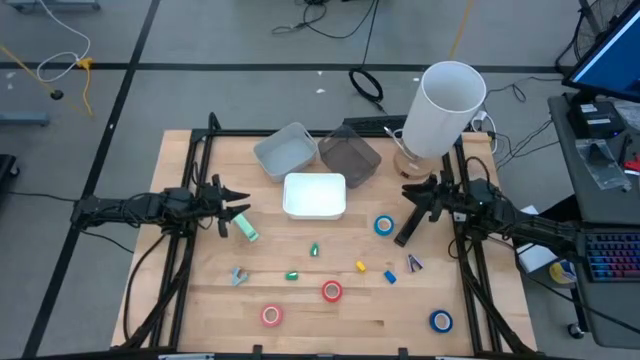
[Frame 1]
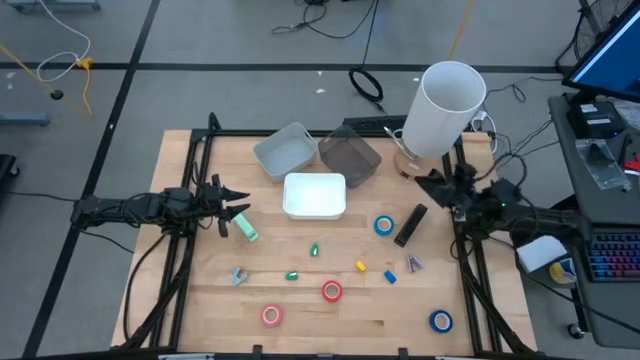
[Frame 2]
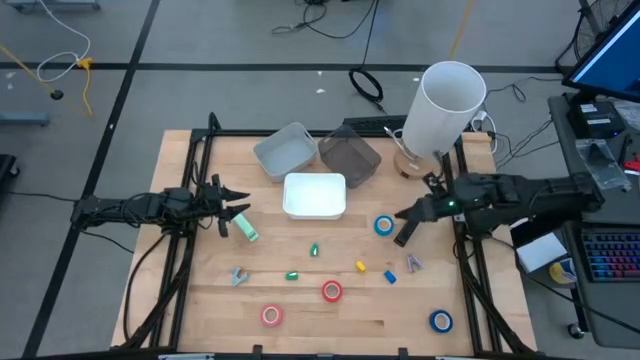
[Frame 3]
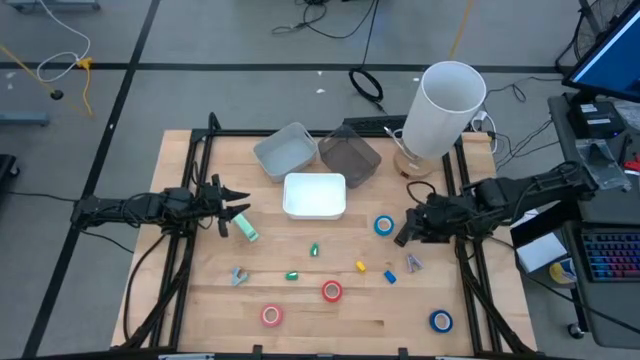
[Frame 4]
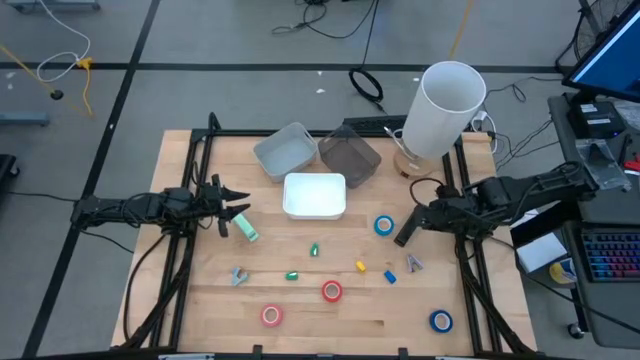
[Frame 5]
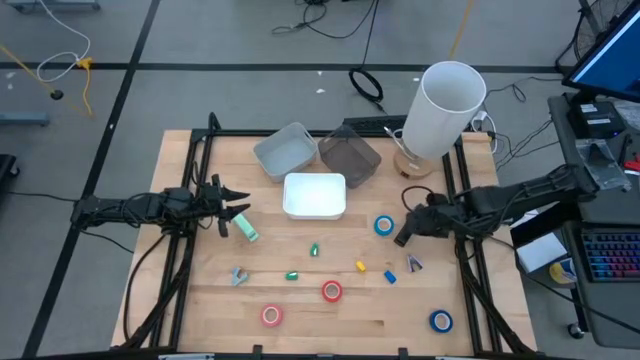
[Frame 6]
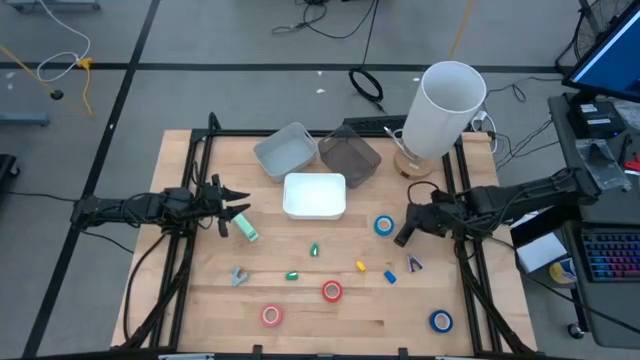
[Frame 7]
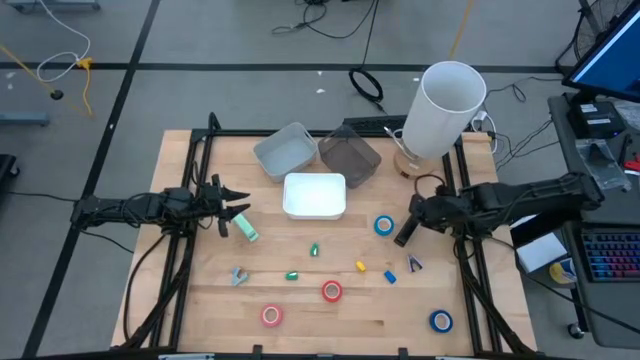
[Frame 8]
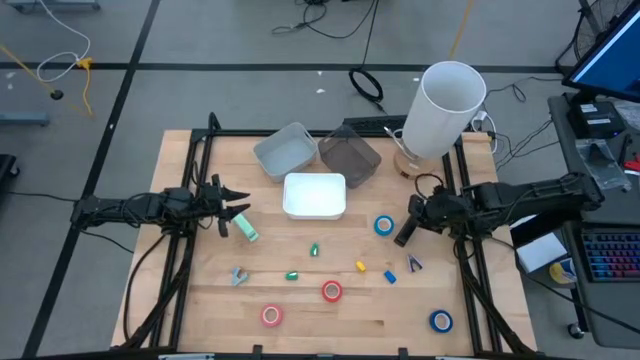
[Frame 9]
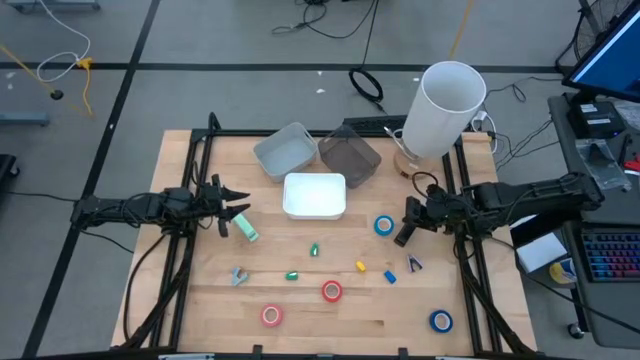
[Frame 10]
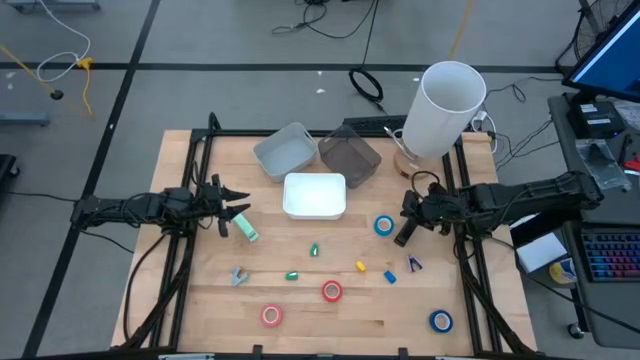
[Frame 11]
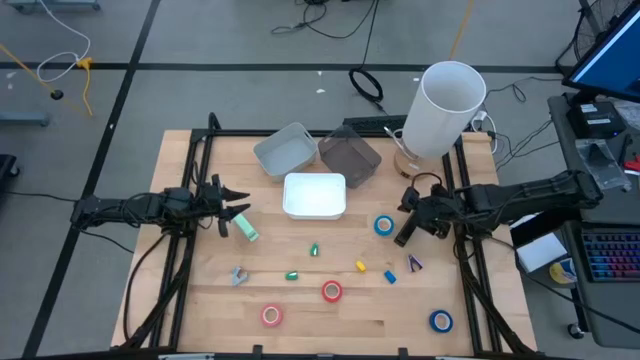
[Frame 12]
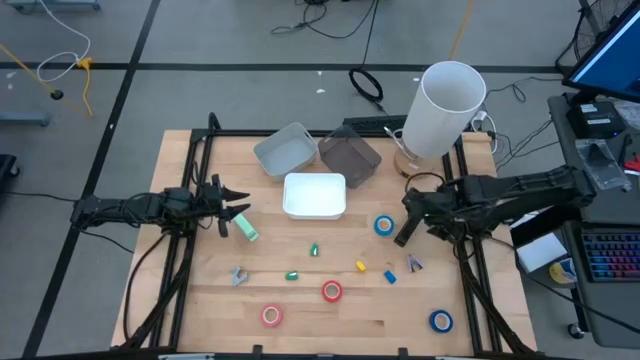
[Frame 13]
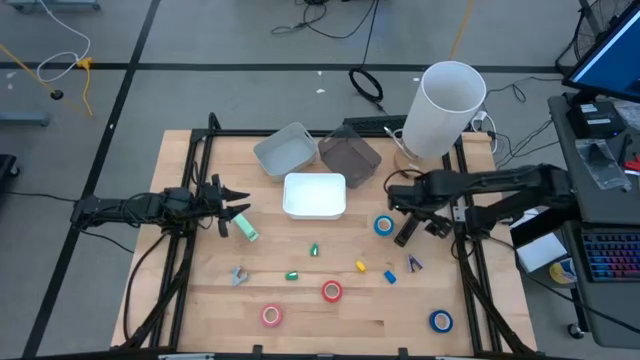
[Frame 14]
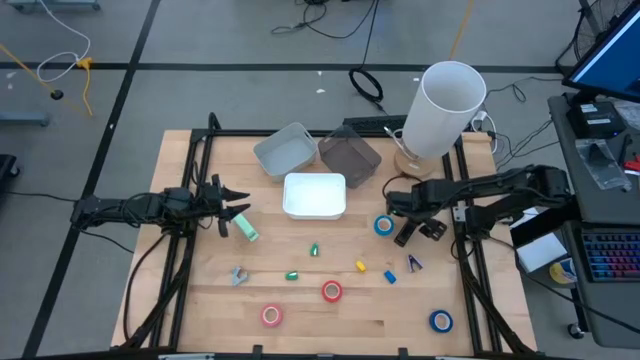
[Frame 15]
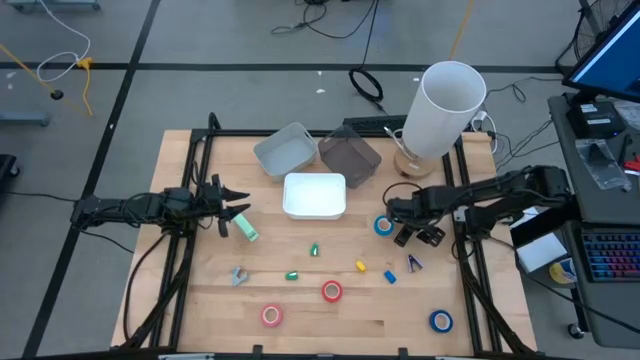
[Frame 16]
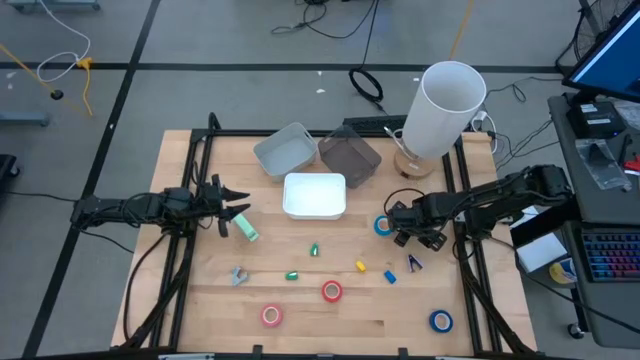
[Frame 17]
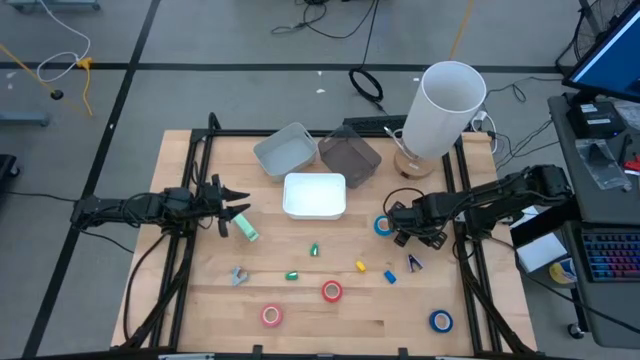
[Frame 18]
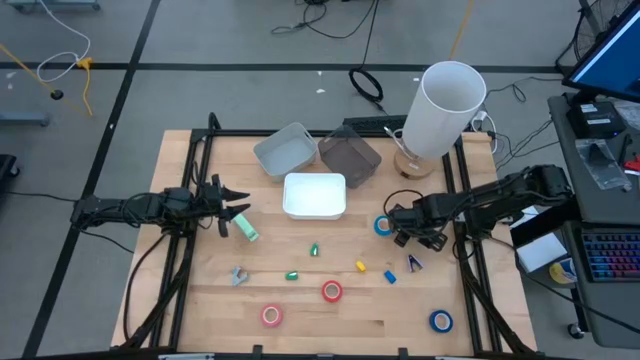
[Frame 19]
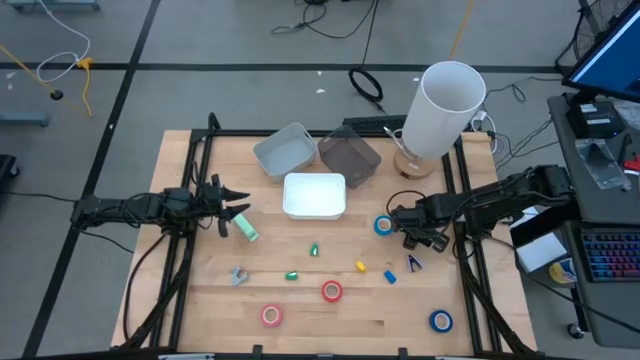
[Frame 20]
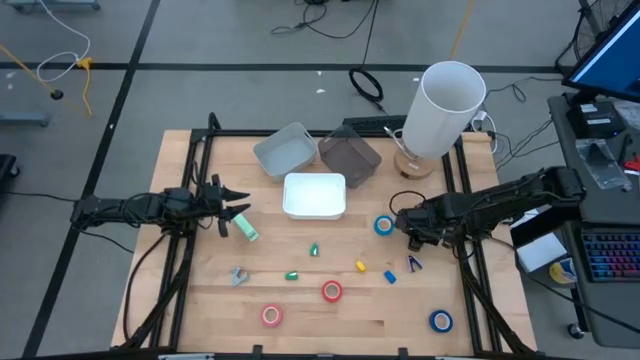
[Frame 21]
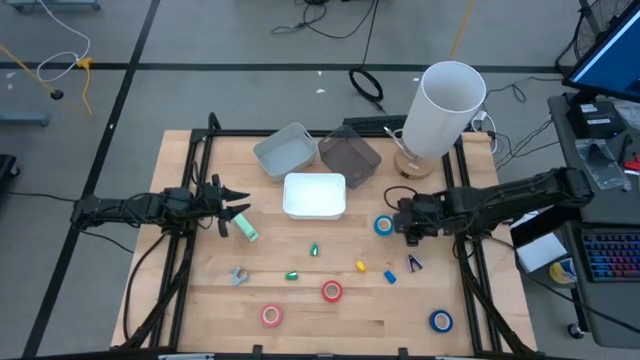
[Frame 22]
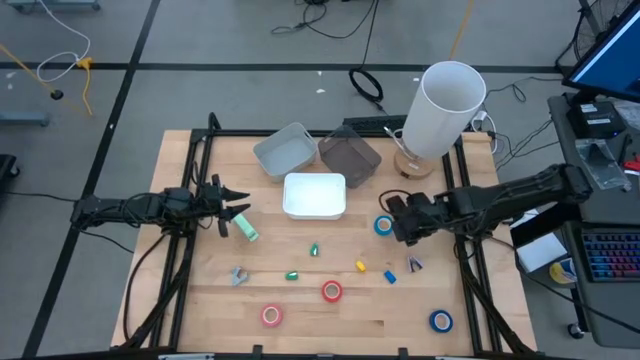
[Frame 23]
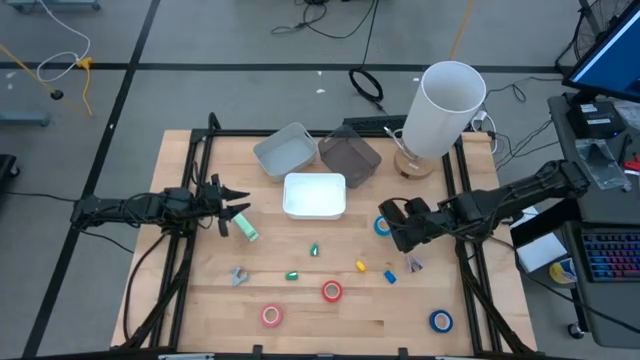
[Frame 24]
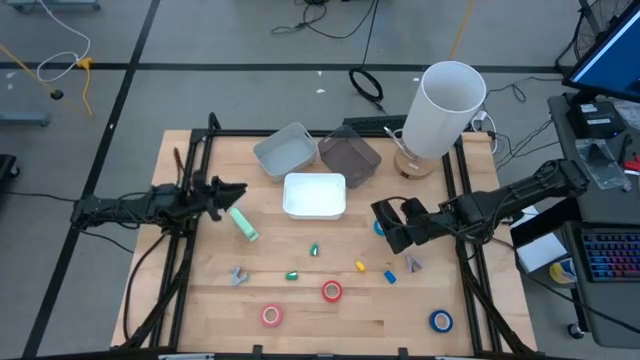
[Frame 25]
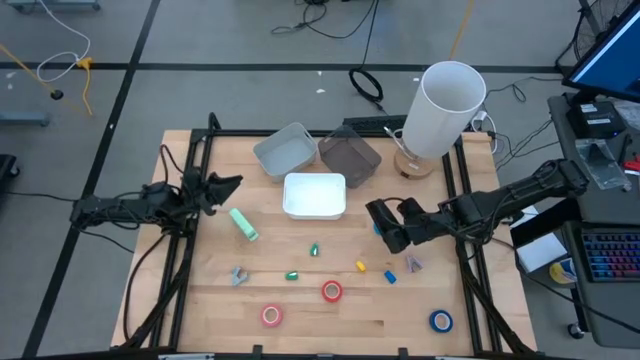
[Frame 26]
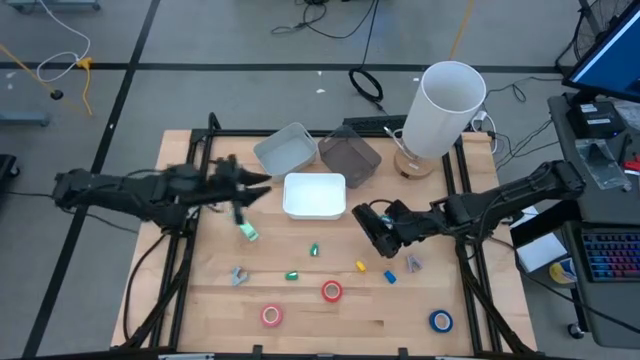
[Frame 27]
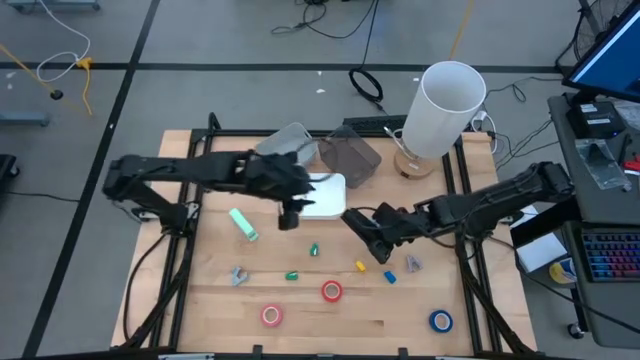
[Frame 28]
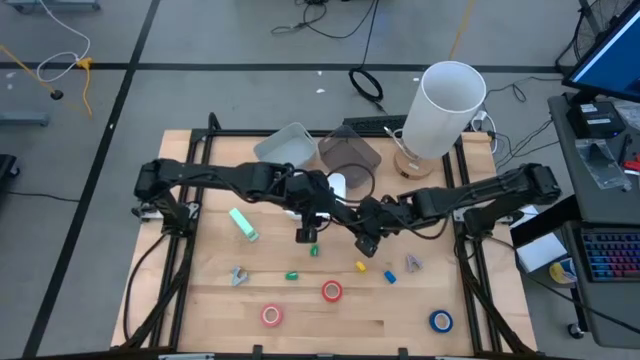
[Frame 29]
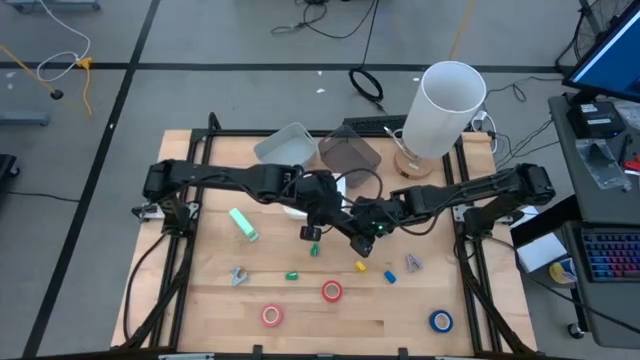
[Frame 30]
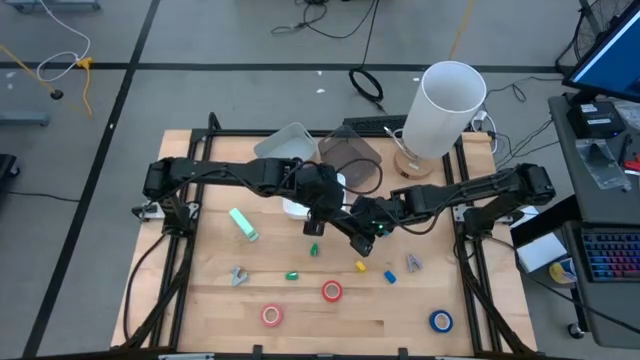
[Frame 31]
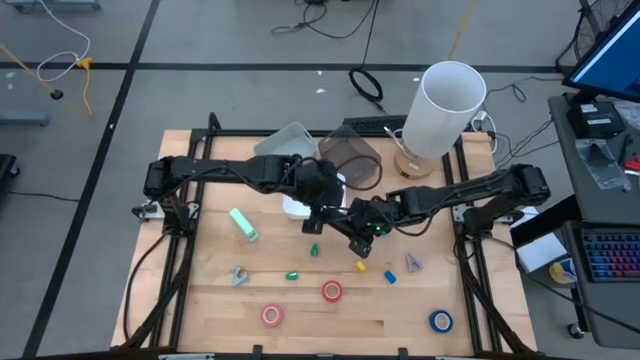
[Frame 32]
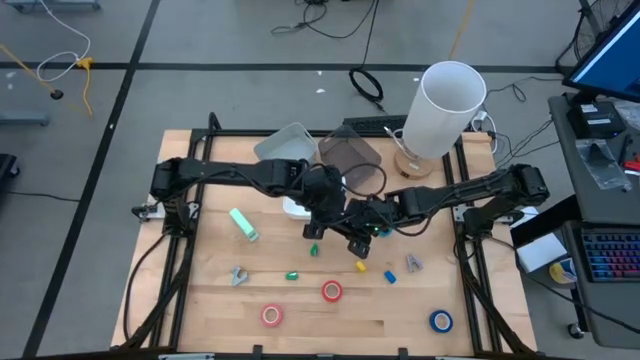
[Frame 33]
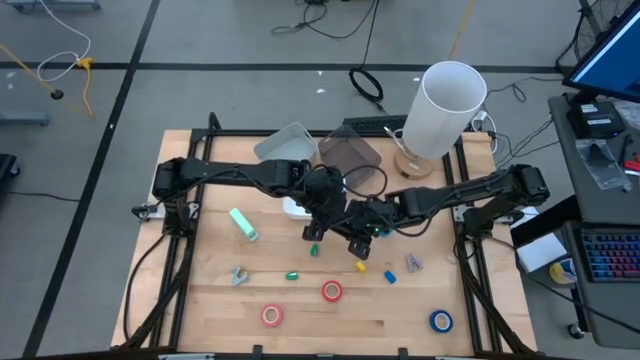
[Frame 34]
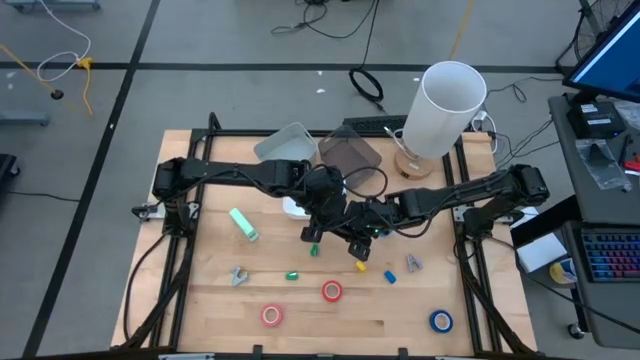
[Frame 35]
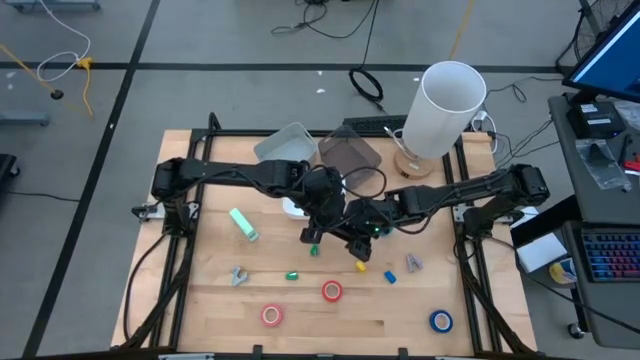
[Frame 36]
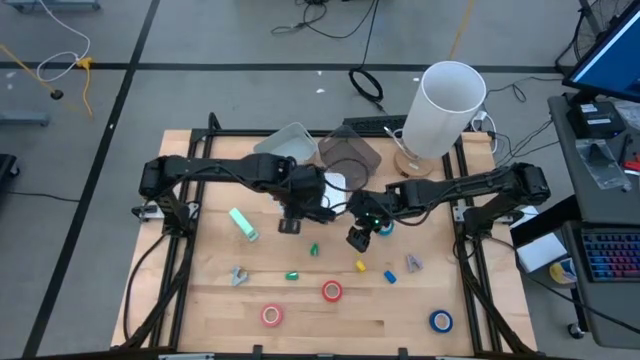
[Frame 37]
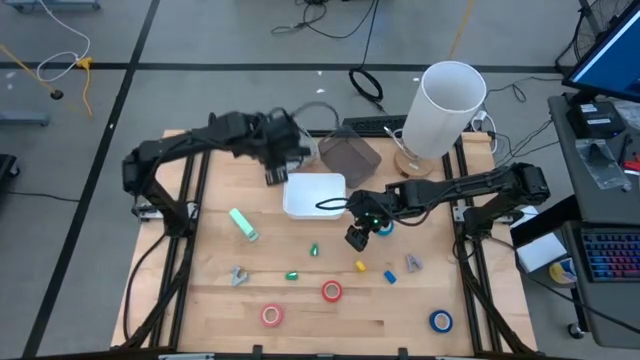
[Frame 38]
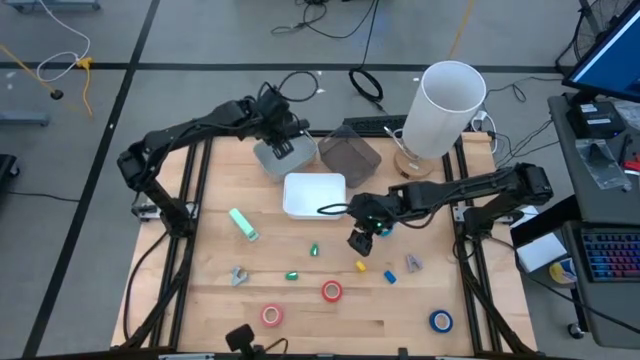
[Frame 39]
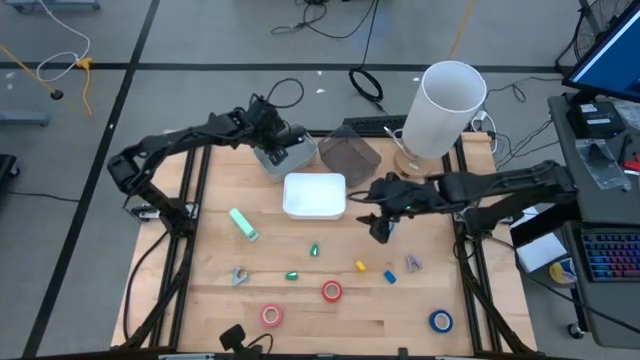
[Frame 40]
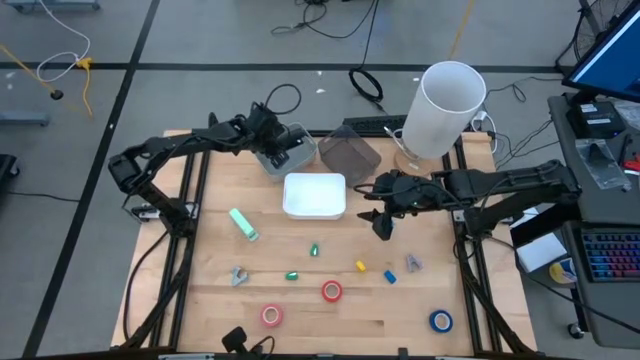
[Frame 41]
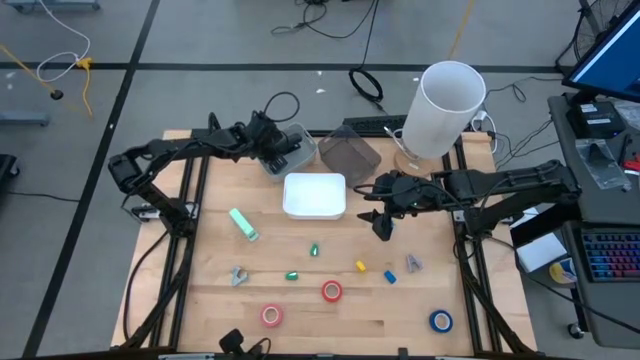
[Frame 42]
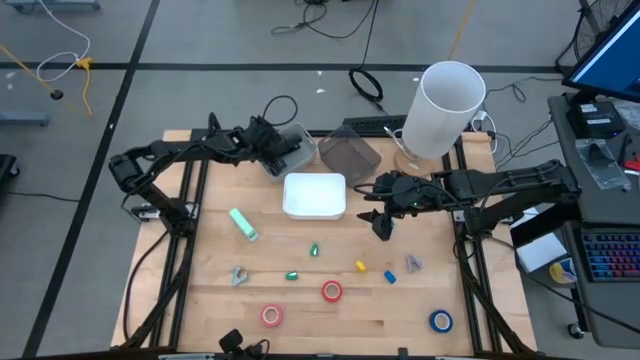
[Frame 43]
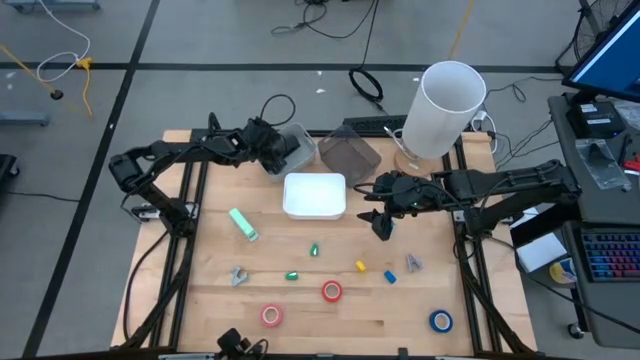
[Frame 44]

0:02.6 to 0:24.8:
Task: Pick and place Stapler, Stapler remover, tape
Put the black stapler into the gray bin
